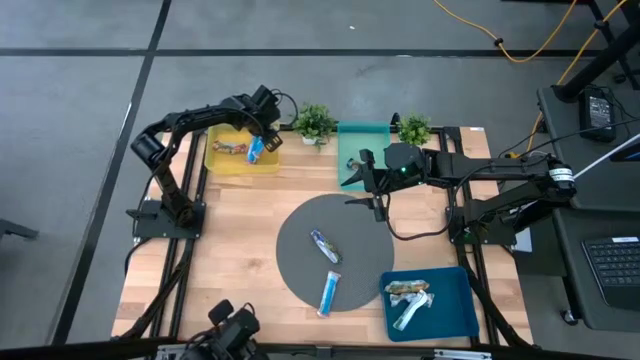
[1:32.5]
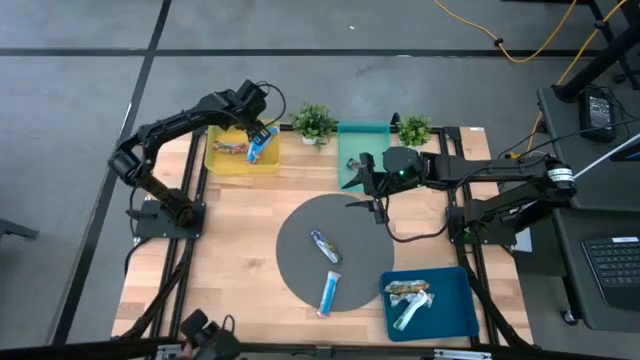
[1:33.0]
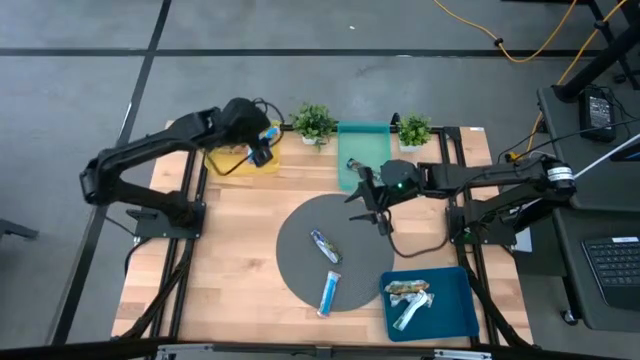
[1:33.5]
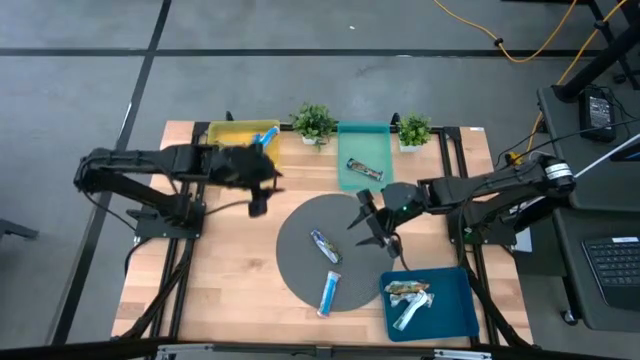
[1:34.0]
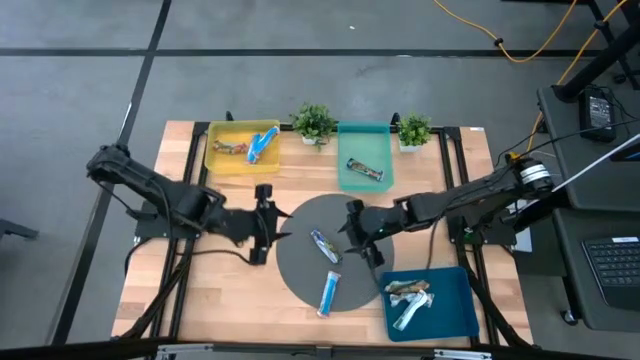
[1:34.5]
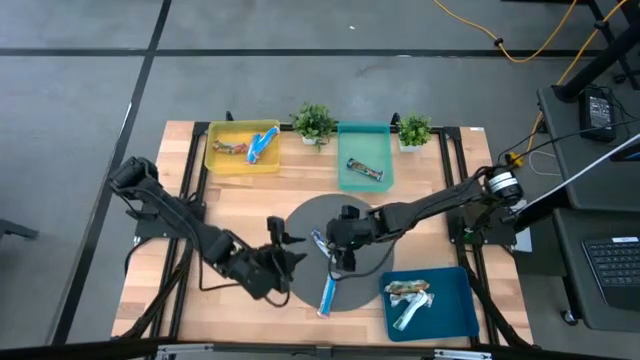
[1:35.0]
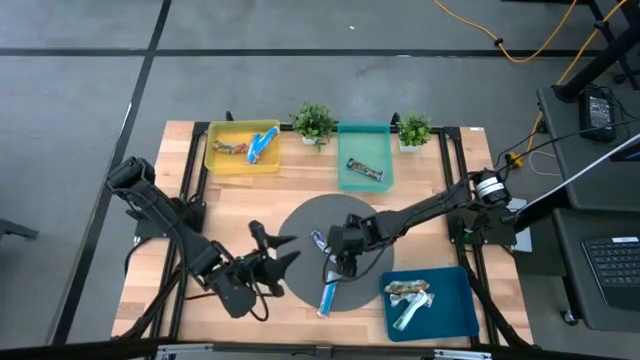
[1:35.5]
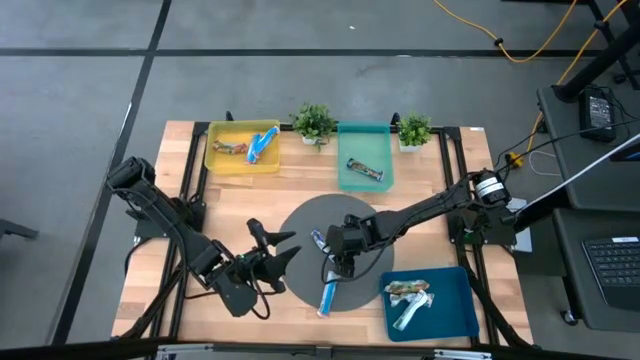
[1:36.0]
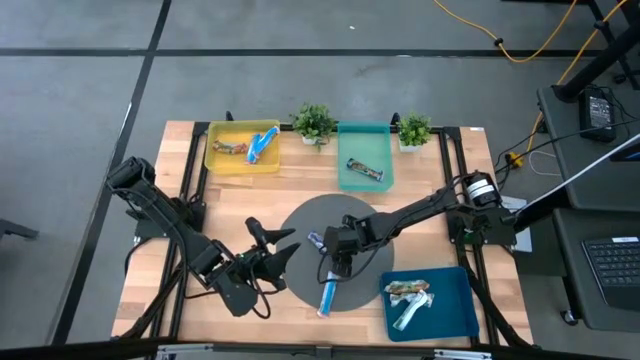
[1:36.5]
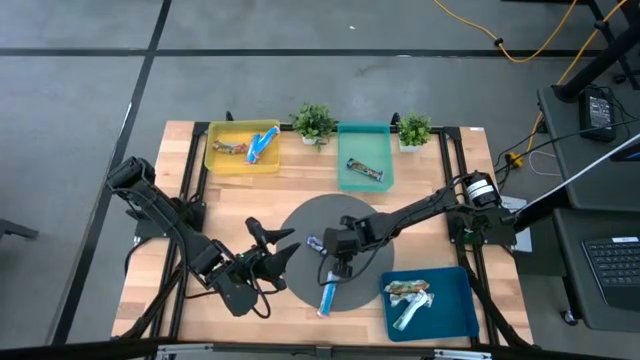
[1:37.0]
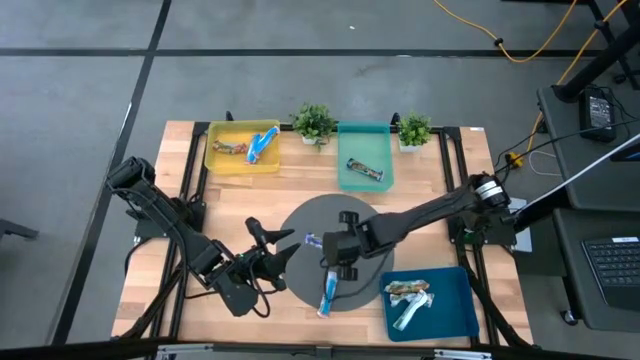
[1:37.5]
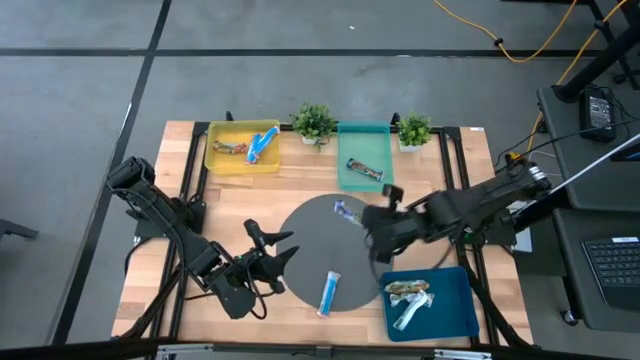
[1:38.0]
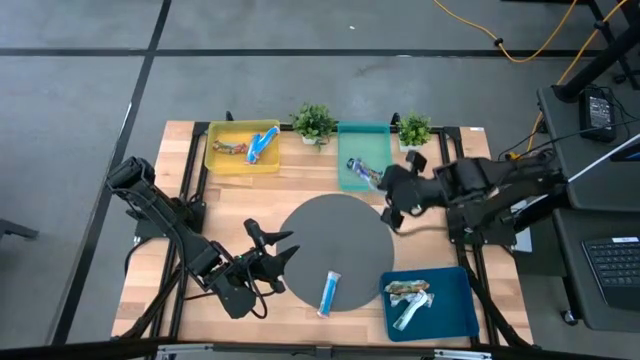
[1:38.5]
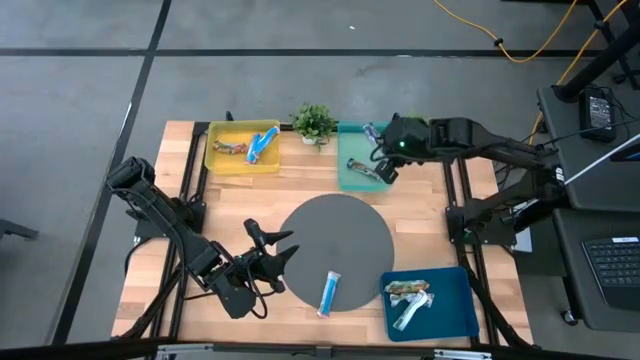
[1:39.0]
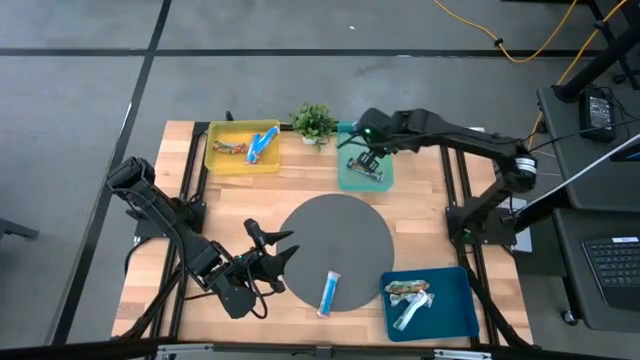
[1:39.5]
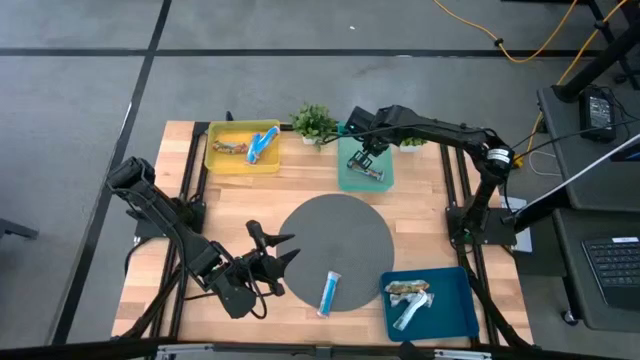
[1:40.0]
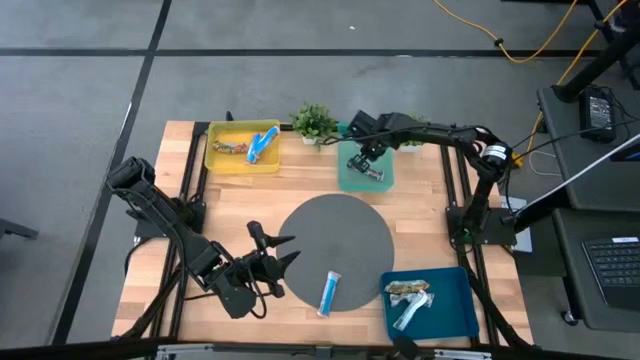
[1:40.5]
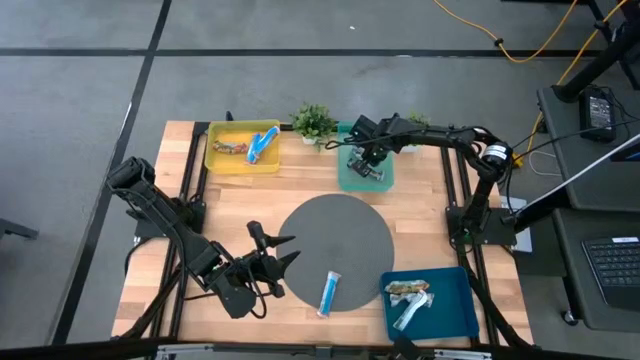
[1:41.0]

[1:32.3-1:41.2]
Task: Pick and place Granola Bars by type
Put the blue granola bar into the light green bin

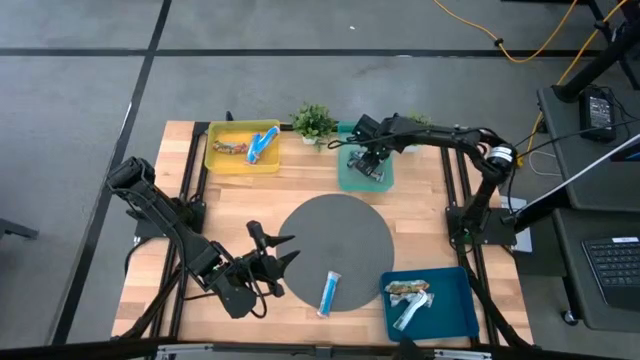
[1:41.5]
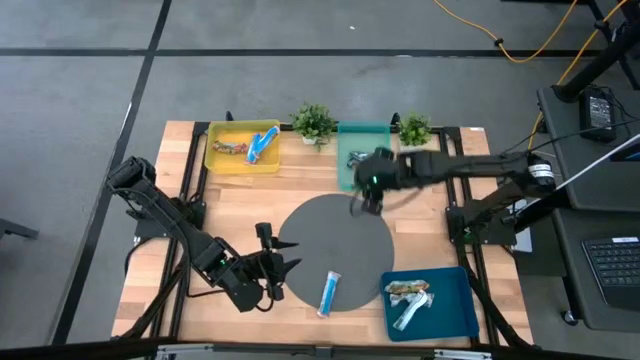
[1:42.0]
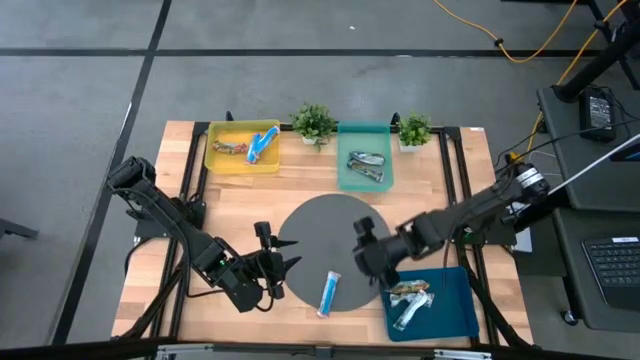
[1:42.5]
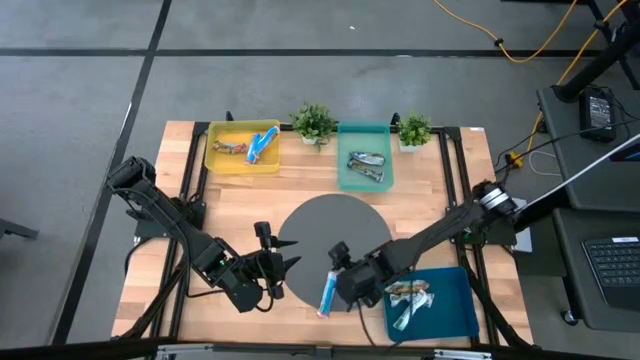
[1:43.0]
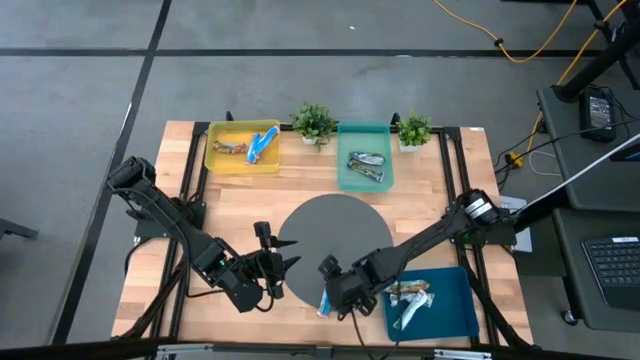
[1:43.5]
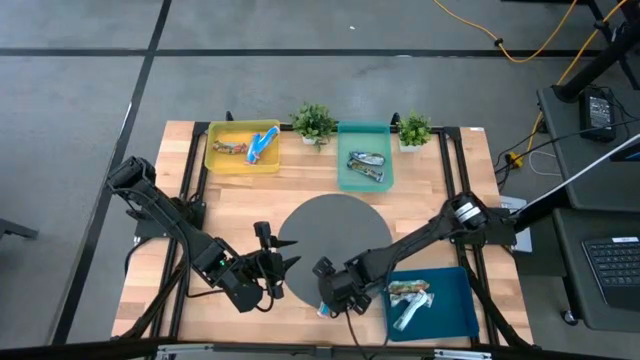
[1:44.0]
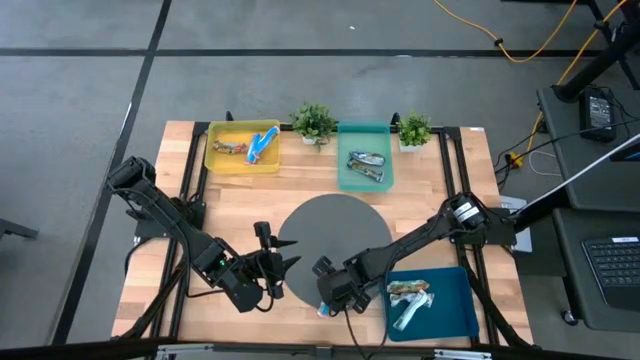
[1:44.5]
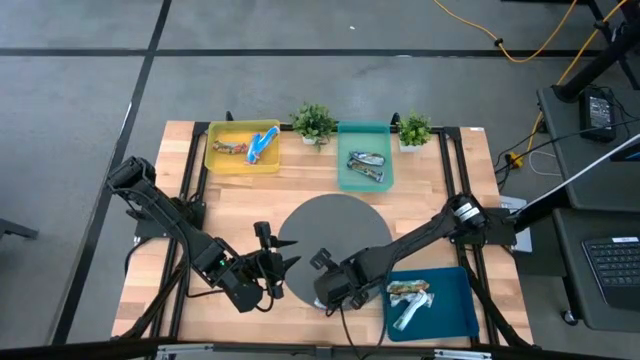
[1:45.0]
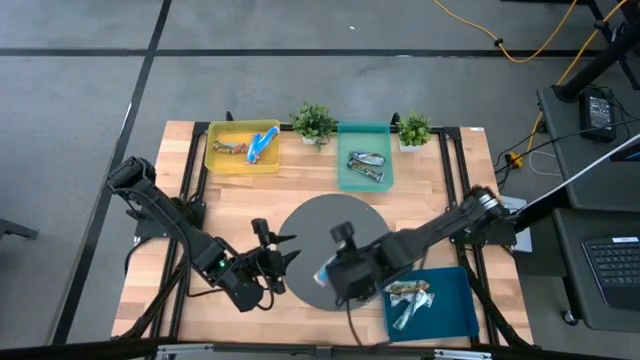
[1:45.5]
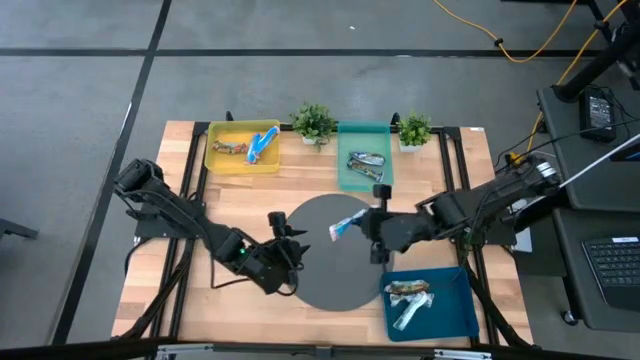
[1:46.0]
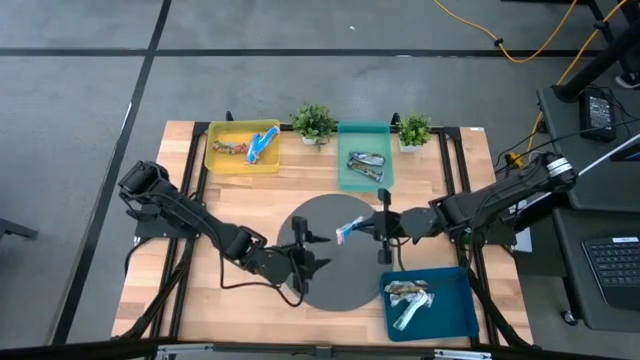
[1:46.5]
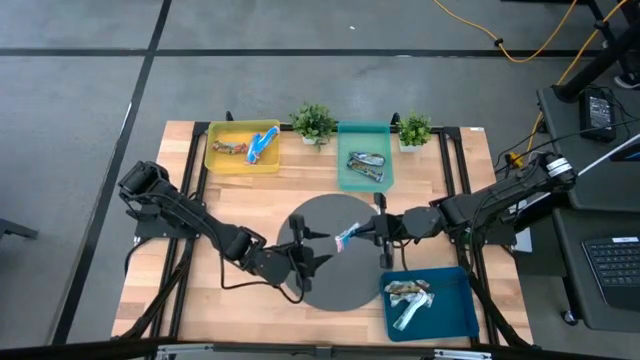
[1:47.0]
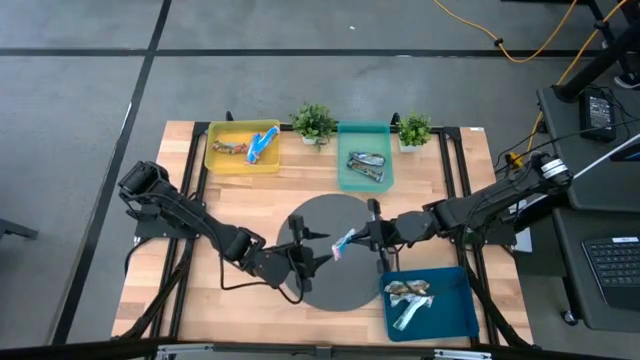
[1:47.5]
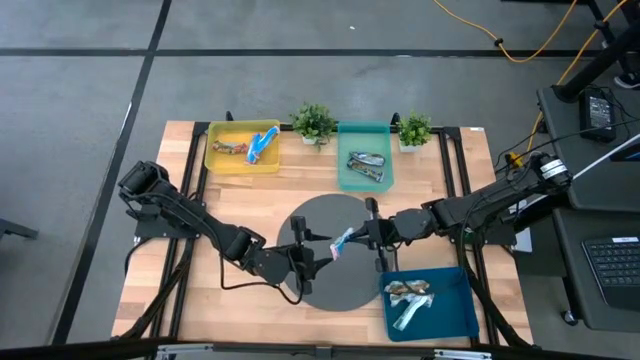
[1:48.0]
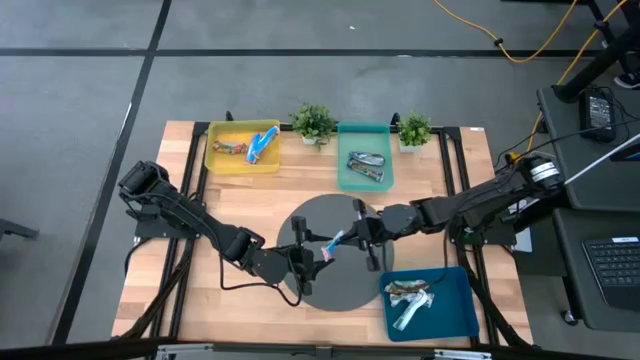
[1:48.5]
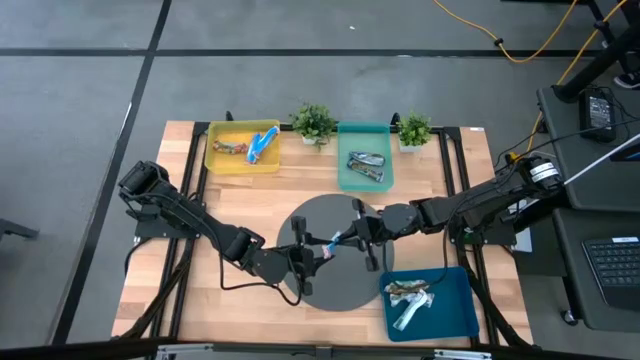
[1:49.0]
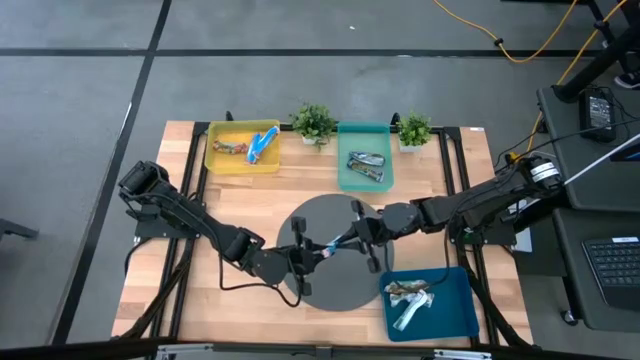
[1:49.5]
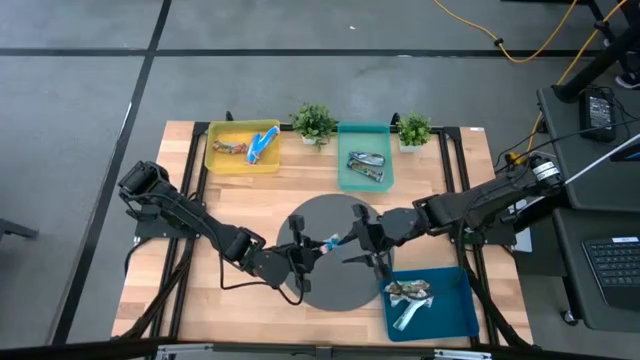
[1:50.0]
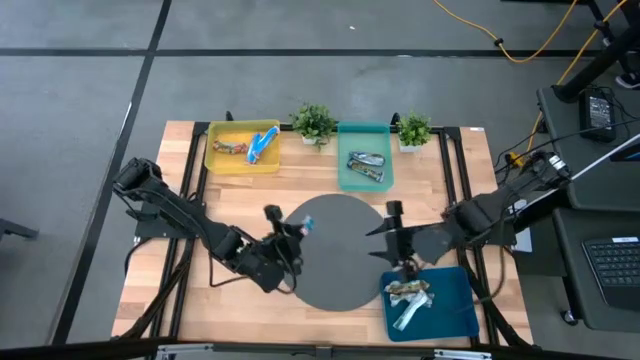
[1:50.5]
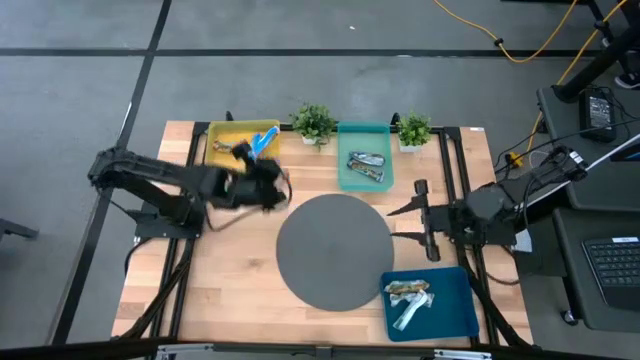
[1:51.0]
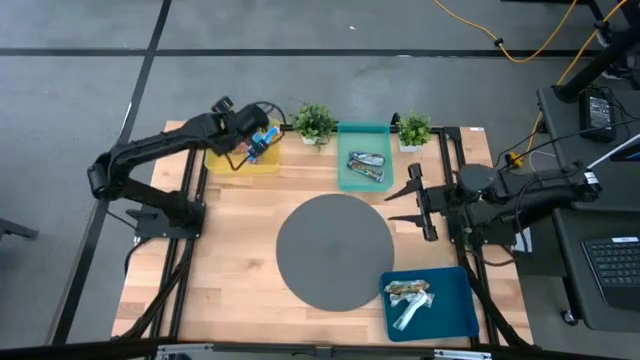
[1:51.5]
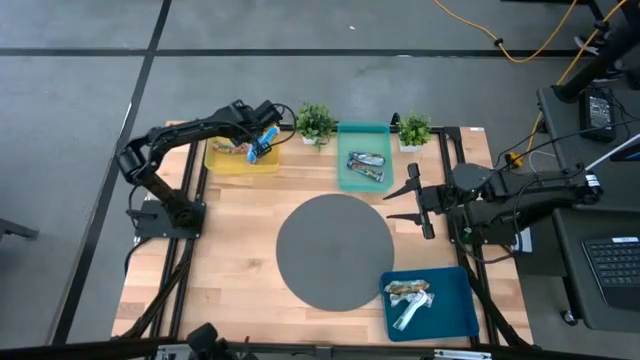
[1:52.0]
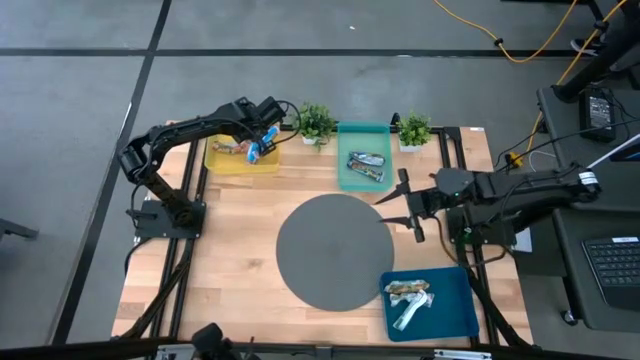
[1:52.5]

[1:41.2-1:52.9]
Put the red granola bar into the yellow bin
